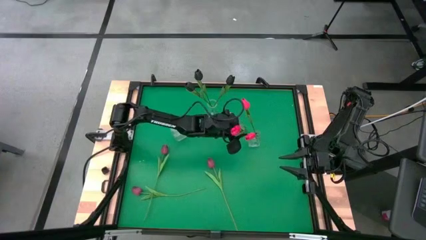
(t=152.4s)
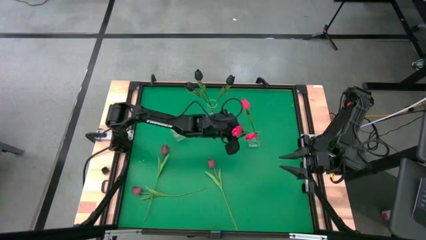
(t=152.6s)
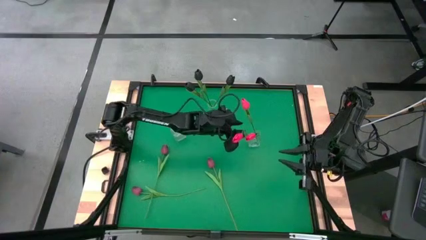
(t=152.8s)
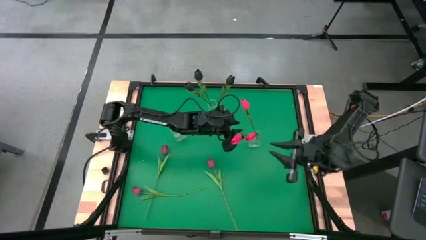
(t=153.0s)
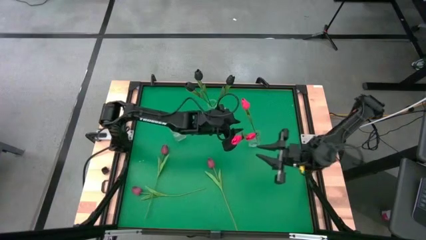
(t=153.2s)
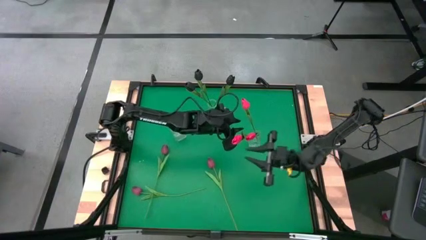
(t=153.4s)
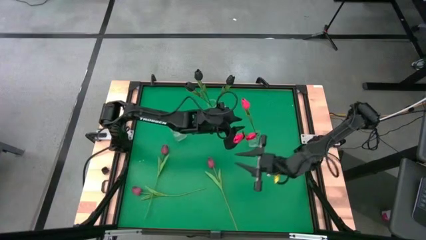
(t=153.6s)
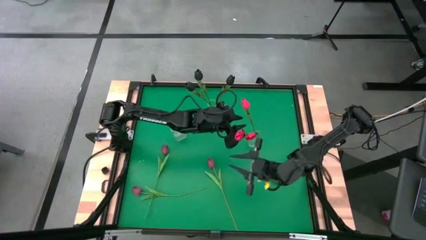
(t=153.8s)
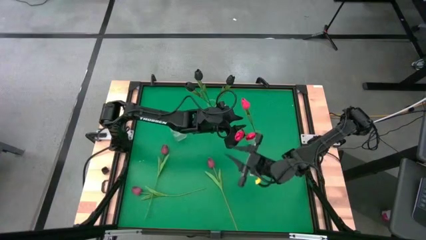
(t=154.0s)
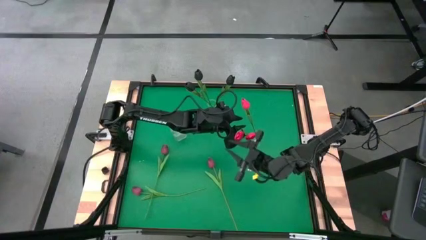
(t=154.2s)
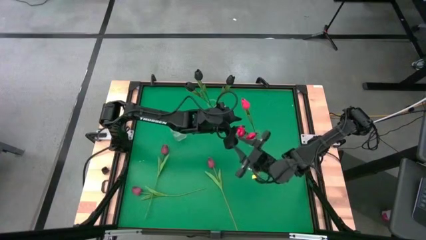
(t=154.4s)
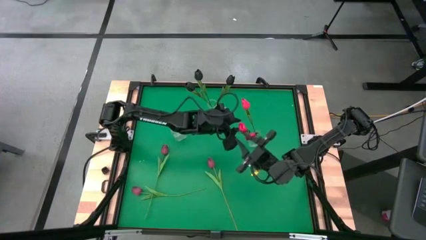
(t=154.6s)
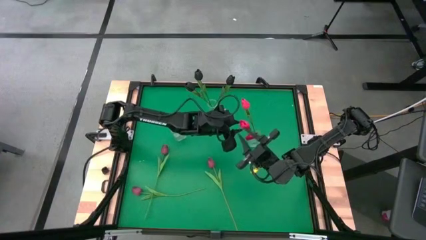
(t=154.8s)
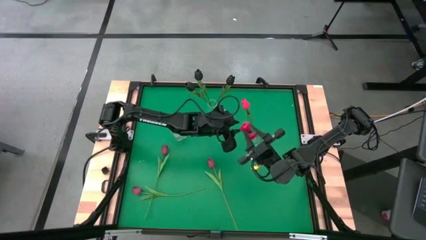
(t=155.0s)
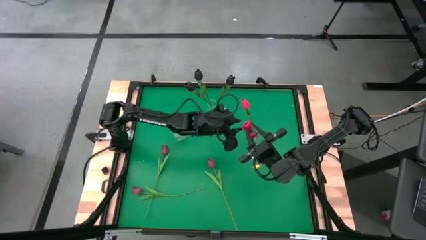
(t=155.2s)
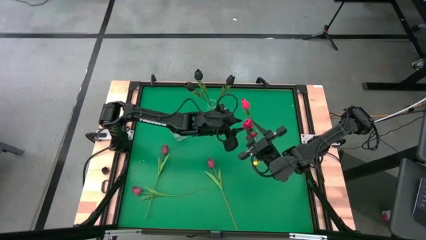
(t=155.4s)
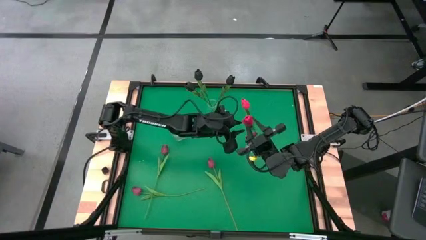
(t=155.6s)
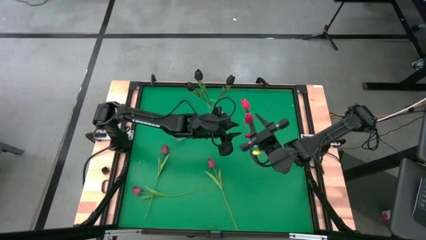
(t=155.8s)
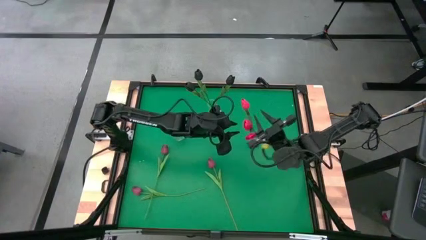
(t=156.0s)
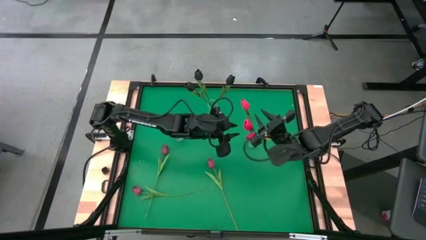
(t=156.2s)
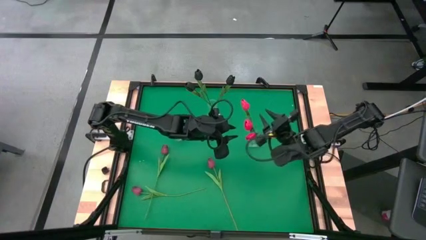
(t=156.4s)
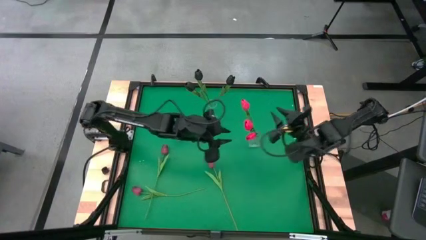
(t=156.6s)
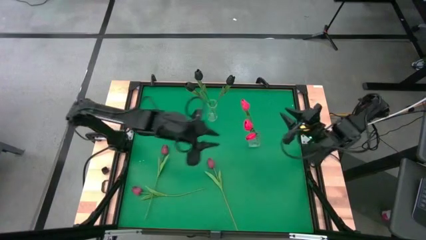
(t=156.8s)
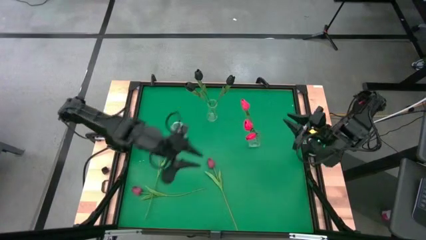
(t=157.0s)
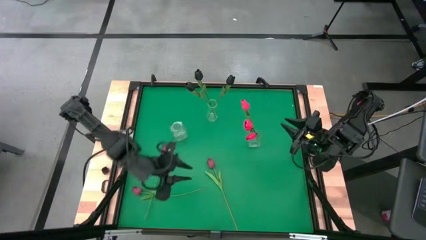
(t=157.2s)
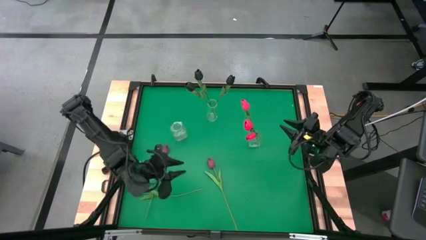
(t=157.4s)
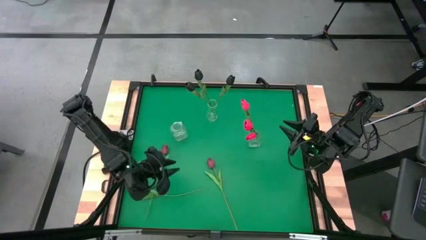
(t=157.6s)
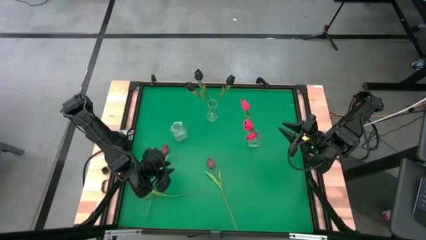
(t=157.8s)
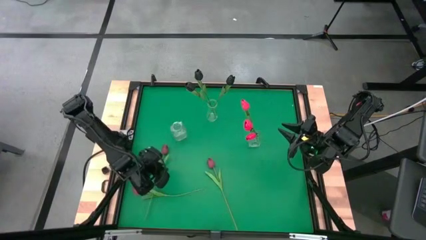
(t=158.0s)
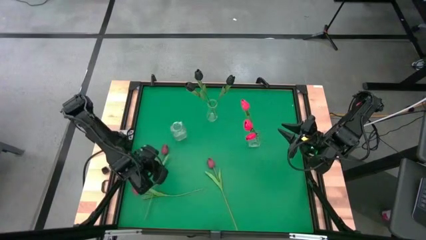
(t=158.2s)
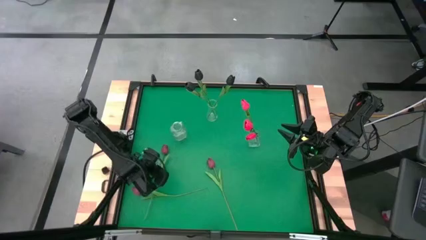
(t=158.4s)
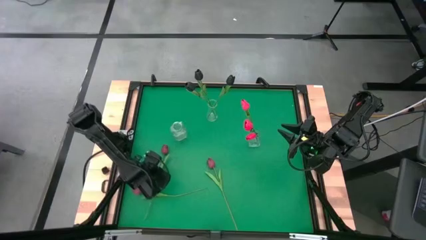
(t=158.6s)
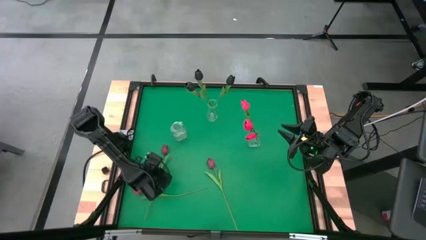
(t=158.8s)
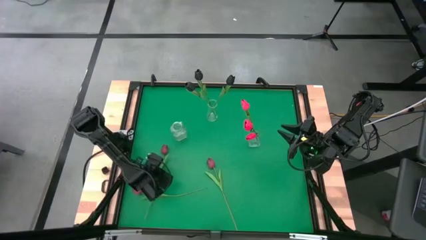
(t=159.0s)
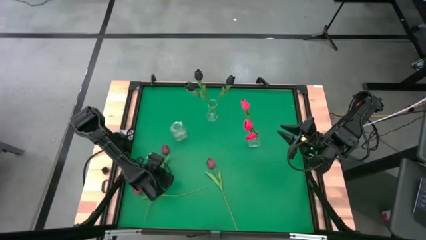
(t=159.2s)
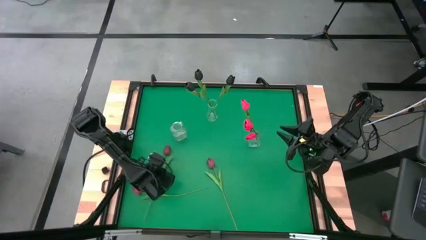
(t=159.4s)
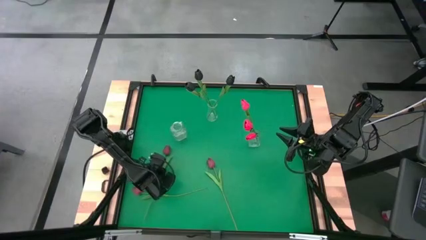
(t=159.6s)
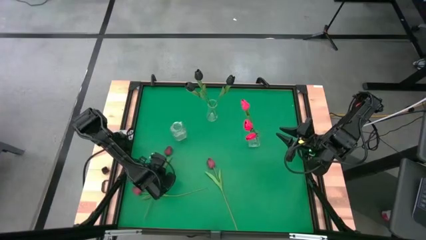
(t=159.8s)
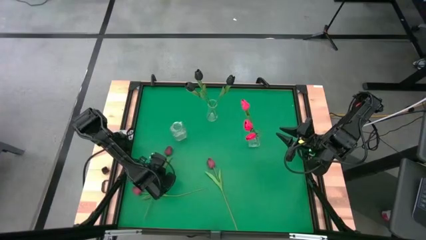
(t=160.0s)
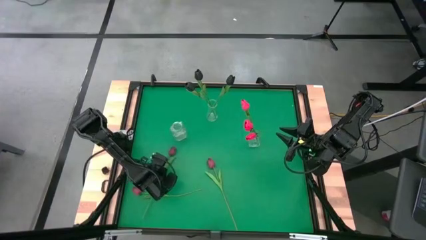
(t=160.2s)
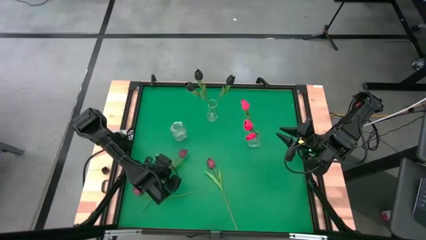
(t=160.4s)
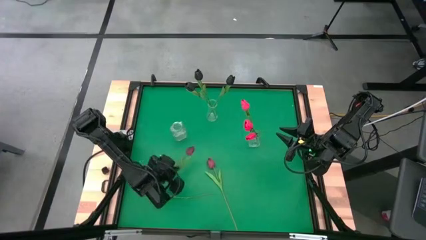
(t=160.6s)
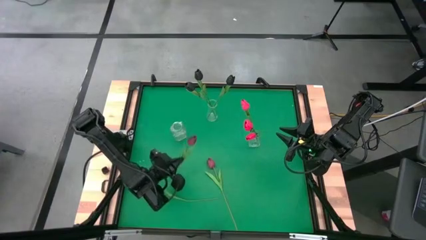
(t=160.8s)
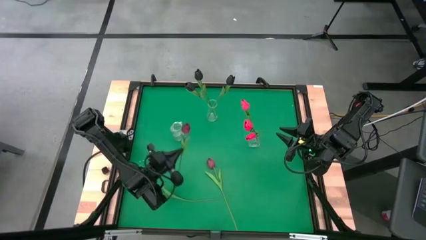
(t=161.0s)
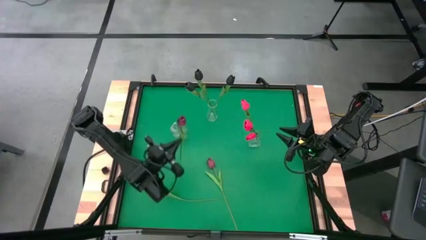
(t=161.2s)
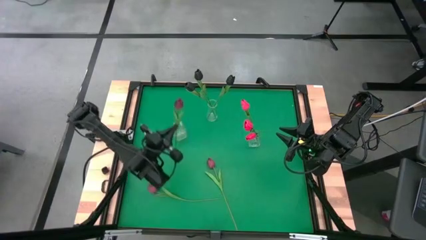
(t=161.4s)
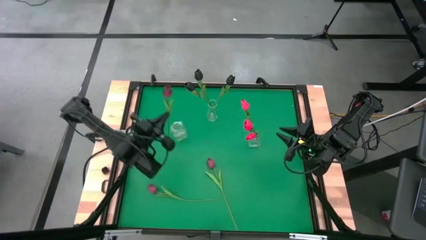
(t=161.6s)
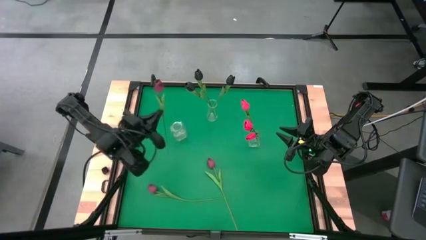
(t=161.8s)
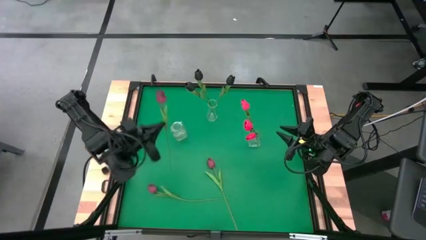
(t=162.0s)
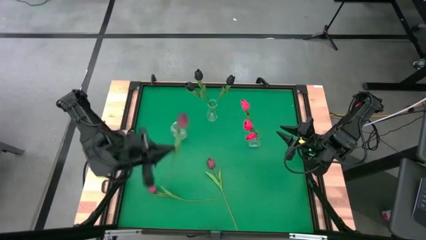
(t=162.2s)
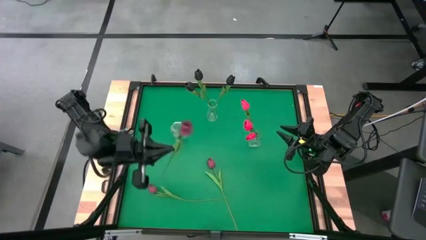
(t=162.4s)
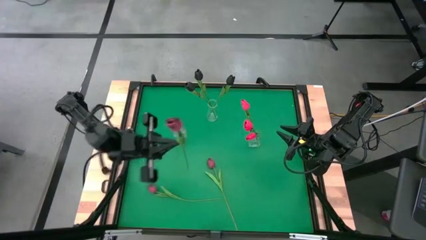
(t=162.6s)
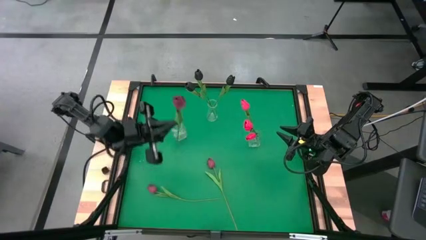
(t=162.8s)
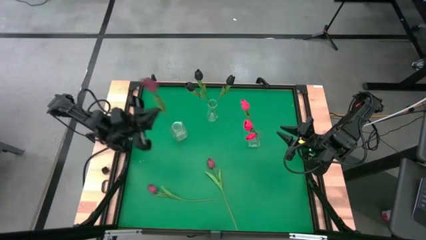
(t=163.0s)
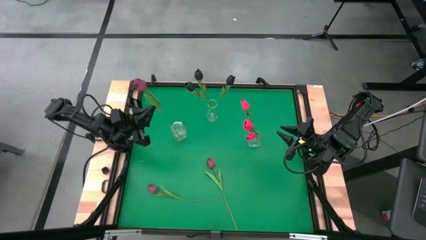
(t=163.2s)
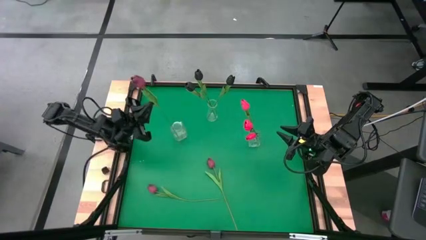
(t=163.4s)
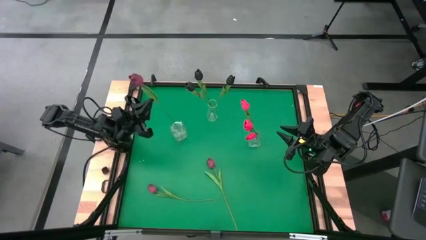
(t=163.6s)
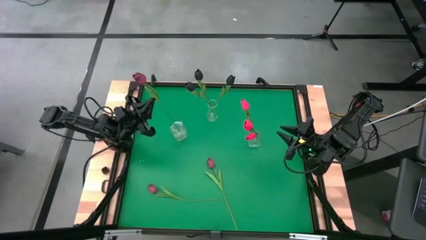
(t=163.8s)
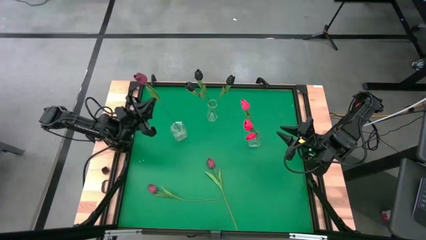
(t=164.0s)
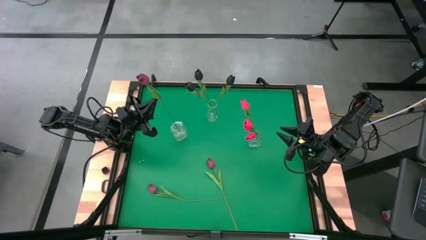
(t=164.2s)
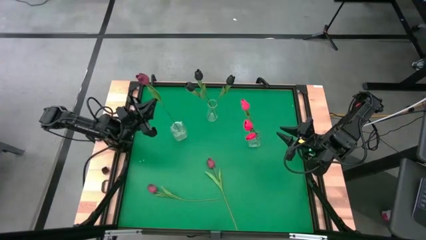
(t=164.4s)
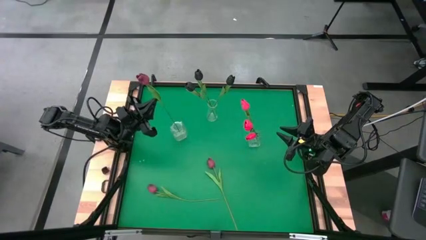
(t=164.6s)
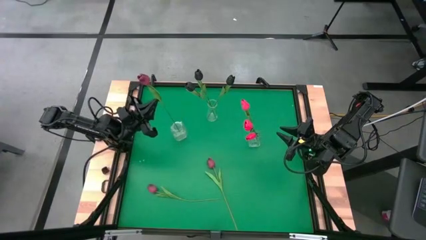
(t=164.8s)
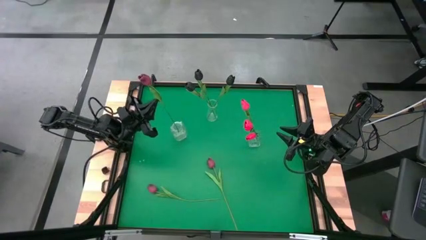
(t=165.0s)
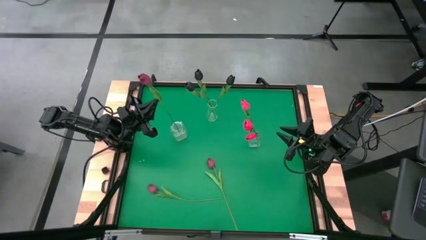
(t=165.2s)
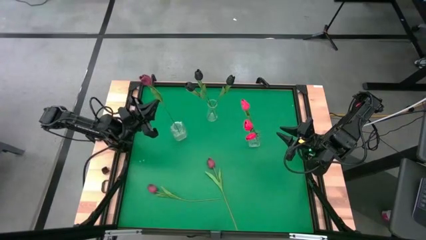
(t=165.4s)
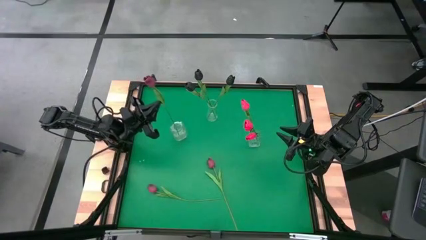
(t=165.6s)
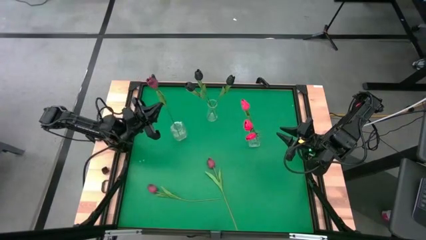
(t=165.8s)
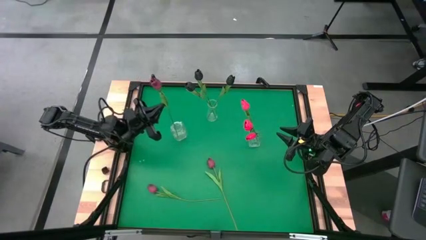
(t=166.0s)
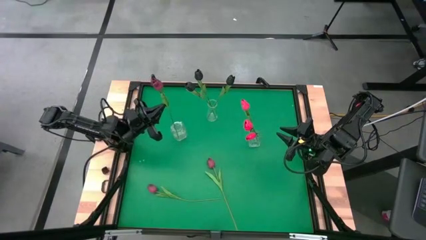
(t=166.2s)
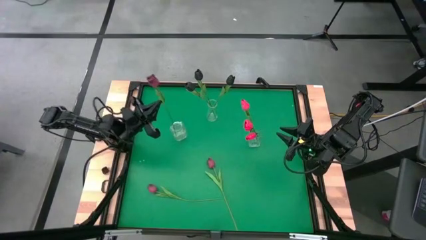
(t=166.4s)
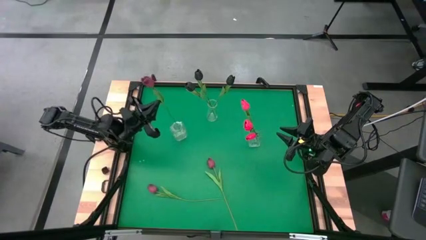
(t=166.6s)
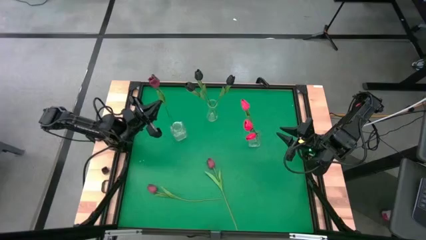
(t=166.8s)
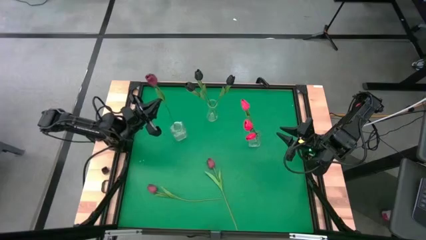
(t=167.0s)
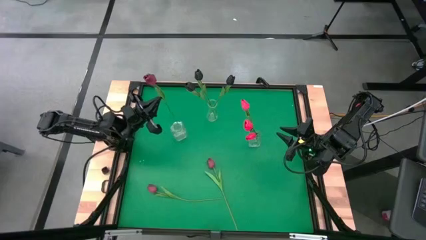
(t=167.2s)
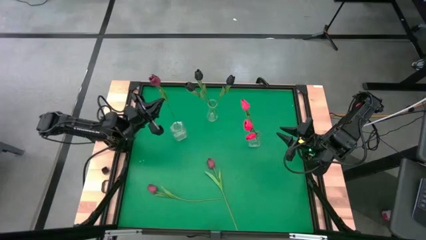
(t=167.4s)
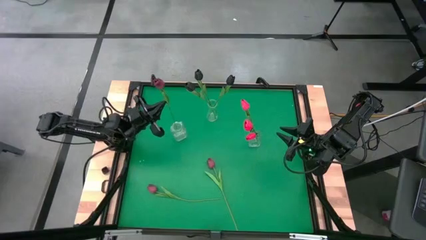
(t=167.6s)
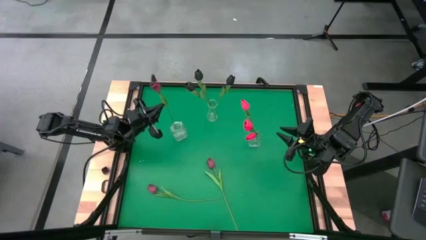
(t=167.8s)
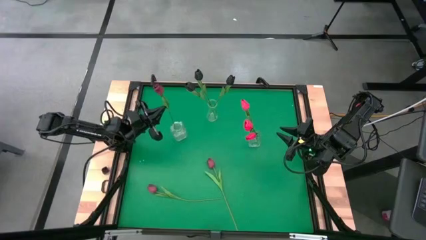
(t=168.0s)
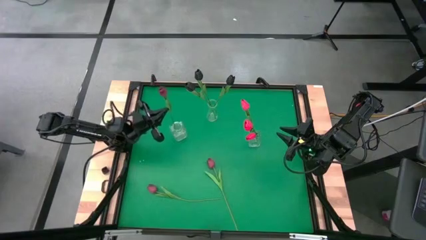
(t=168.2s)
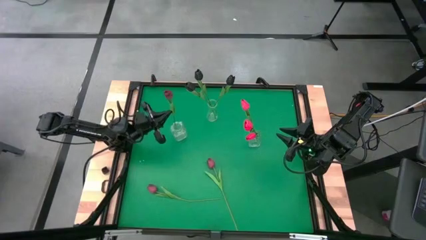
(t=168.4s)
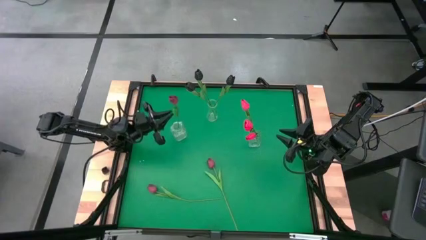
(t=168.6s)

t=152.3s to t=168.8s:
Task: Sort flowers into vase by color
Put the top red tulip into the bottom left transparent vase
